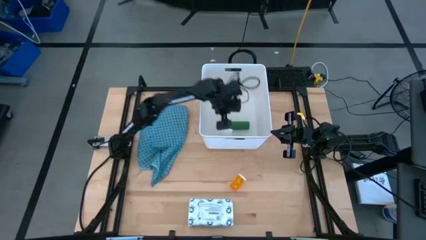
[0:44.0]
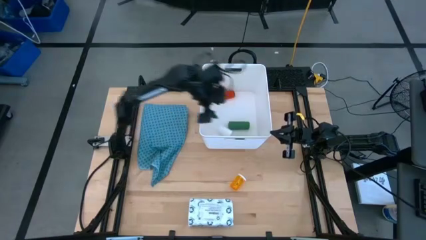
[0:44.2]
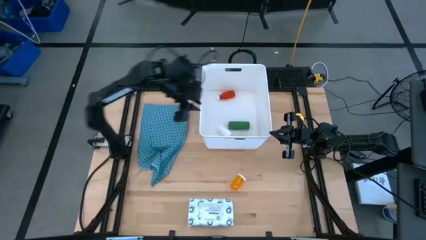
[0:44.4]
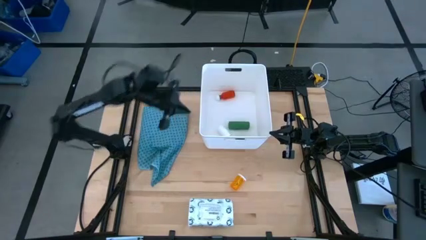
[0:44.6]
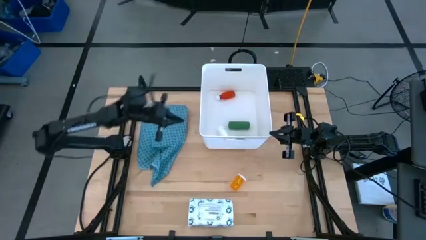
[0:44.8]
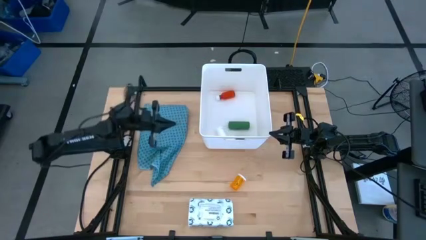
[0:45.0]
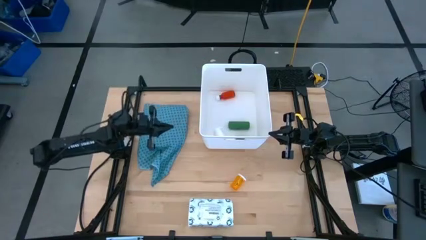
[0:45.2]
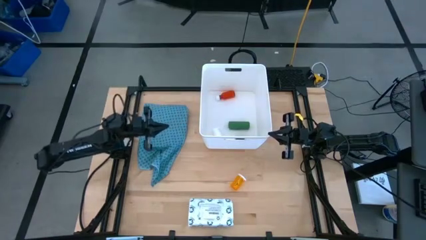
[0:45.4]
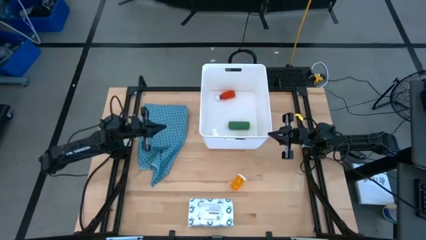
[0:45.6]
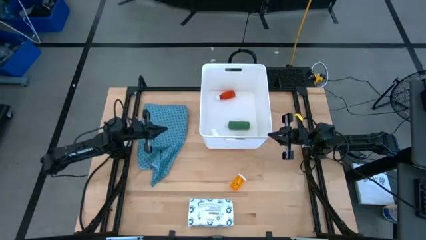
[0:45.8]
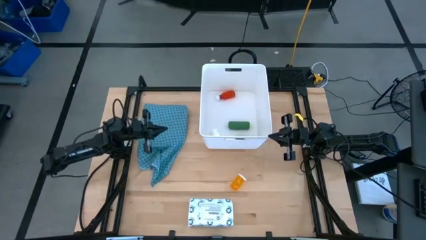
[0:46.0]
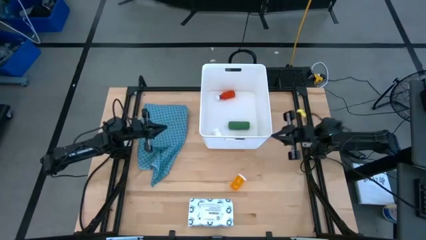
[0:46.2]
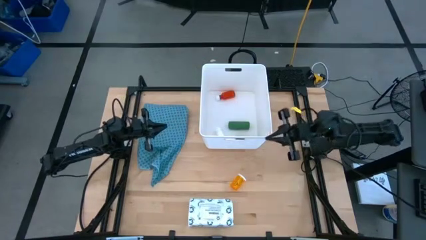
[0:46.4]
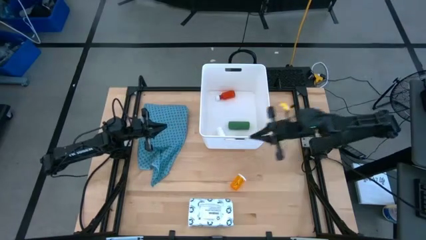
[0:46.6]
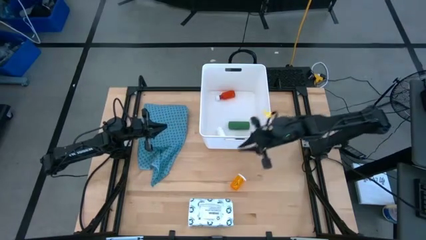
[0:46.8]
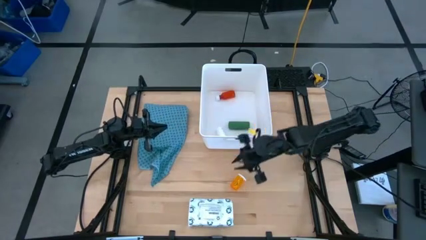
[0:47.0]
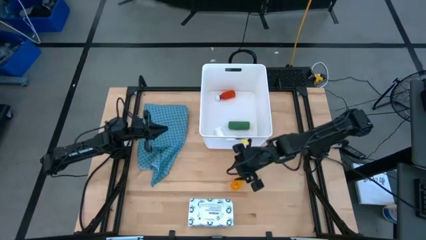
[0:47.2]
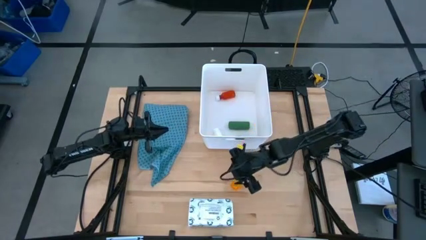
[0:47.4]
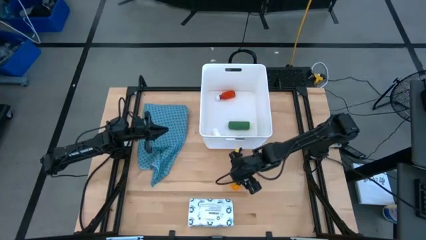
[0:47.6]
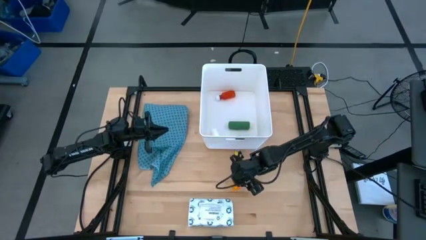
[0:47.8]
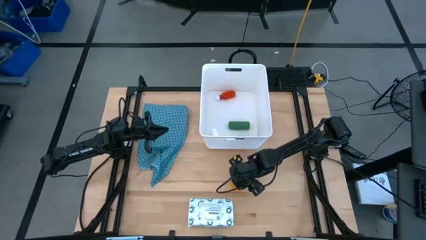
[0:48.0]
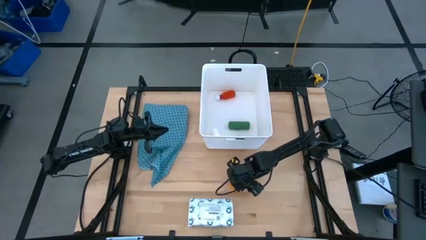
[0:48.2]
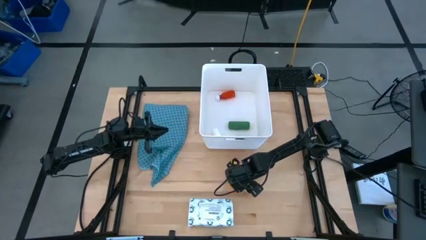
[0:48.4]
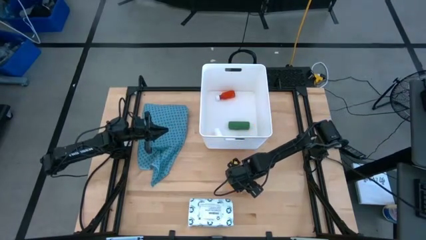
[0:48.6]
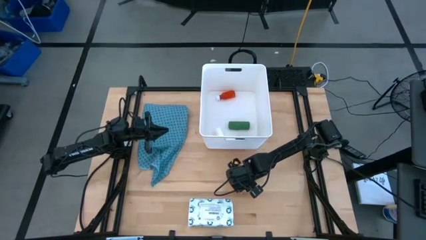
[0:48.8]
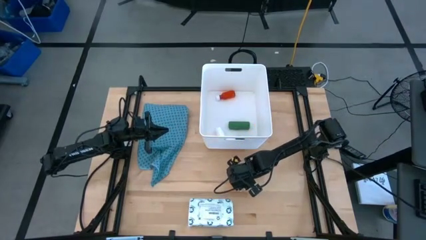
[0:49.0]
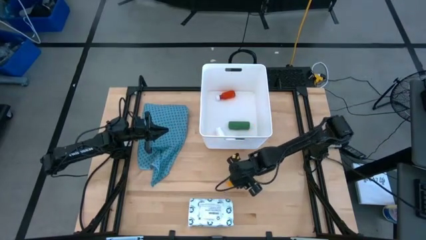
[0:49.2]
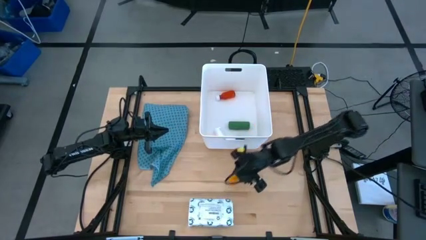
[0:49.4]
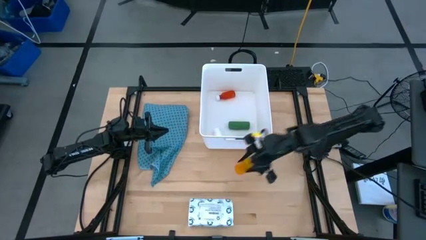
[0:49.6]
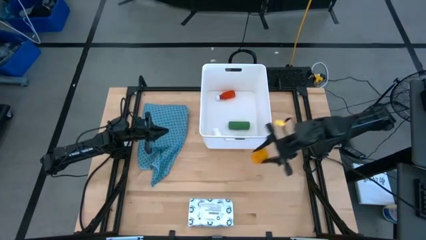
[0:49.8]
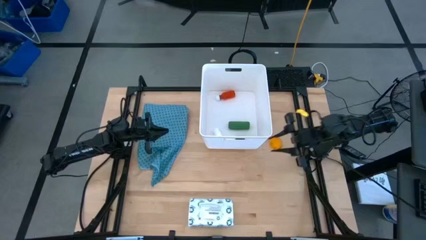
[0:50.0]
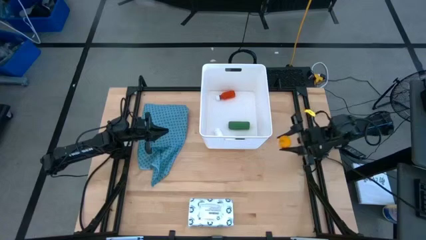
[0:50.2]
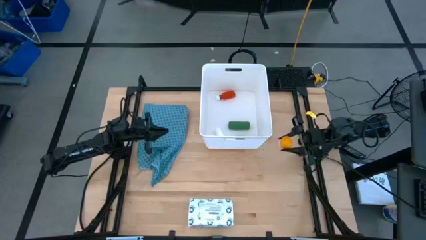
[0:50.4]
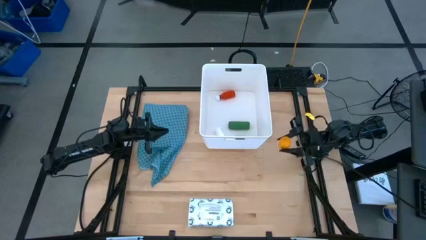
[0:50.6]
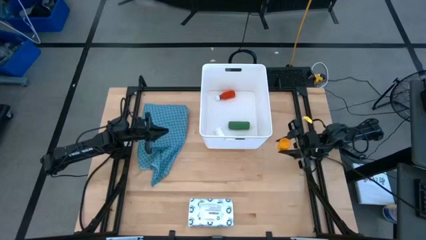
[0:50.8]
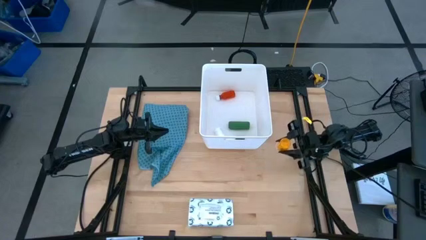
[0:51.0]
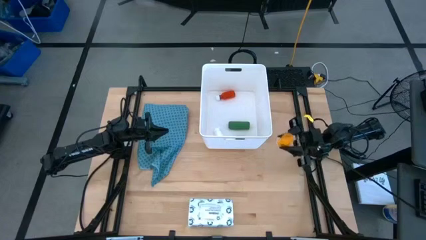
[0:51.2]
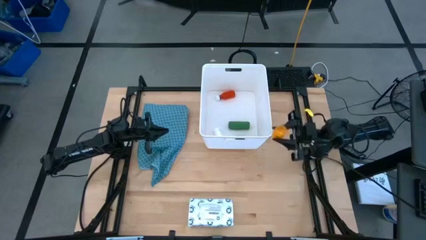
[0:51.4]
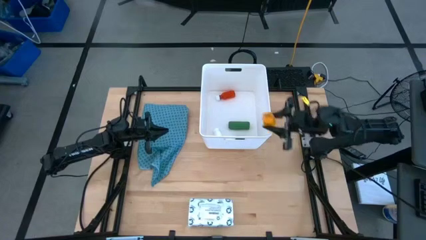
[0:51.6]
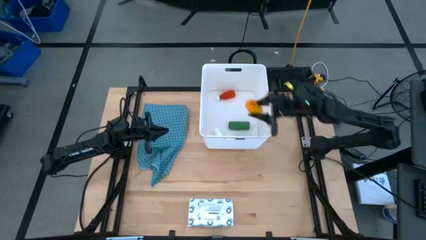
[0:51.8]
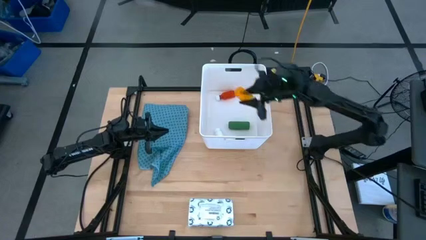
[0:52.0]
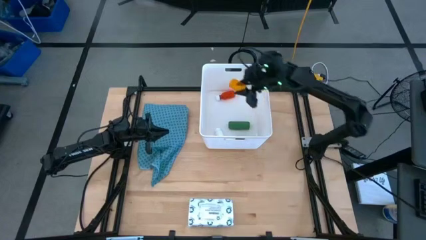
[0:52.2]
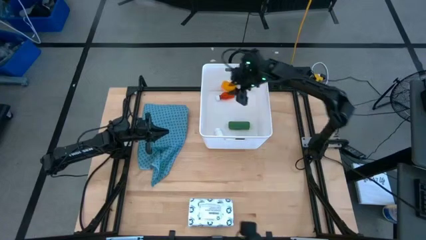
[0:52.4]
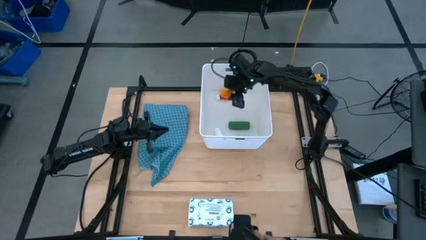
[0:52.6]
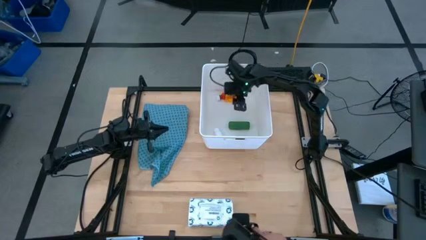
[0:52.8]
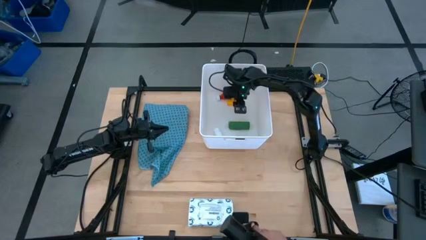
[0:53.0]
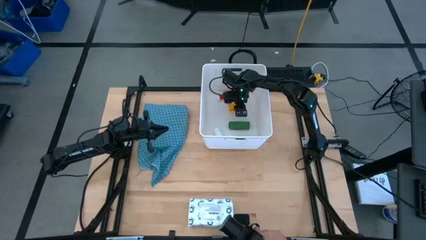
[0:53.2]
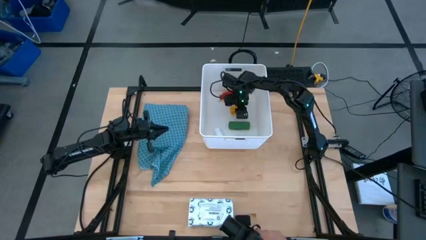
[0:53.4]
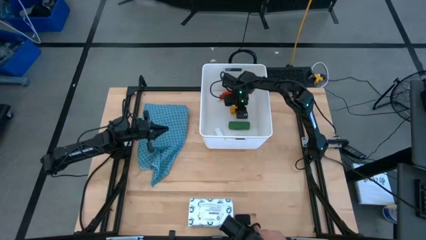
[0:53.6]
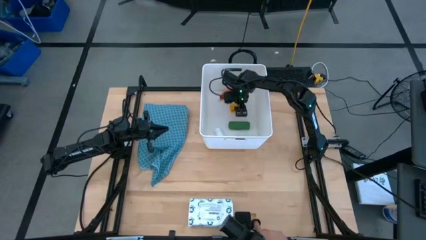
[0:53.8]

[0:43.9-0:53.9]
Task: Pick & place medical supplies in basket/bin
Put the orange pill bottle into the white bin

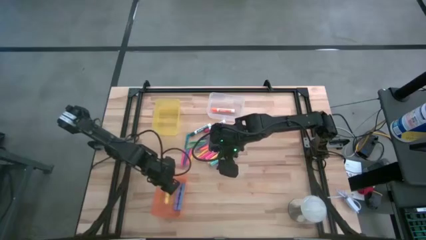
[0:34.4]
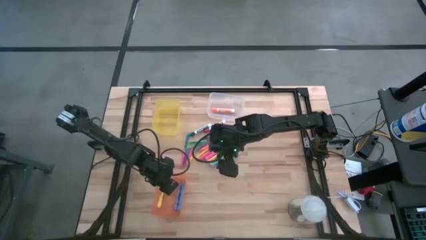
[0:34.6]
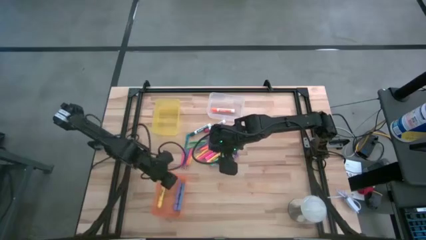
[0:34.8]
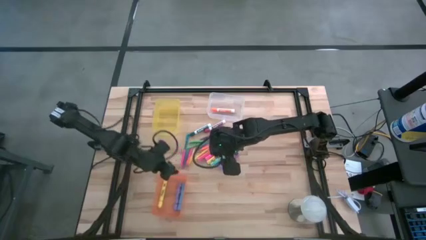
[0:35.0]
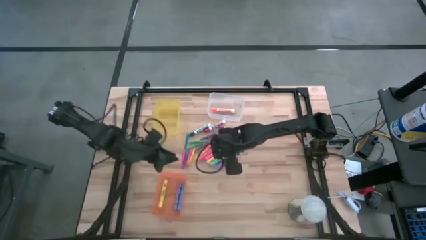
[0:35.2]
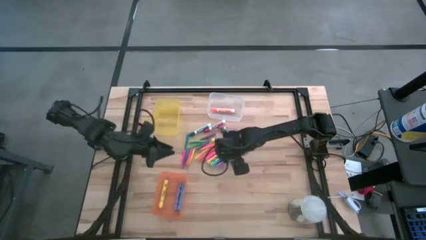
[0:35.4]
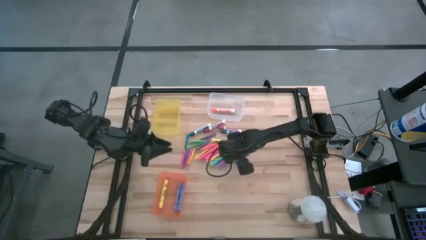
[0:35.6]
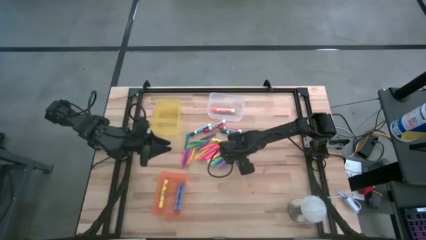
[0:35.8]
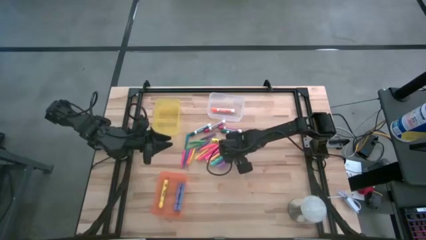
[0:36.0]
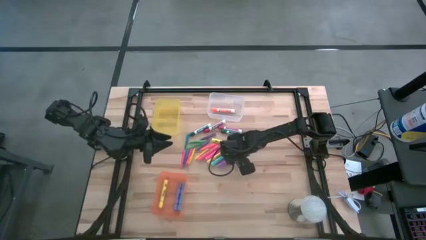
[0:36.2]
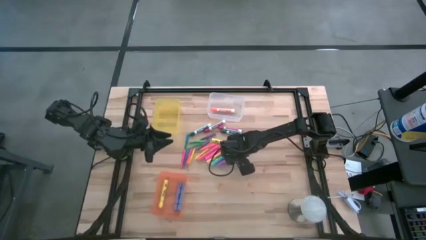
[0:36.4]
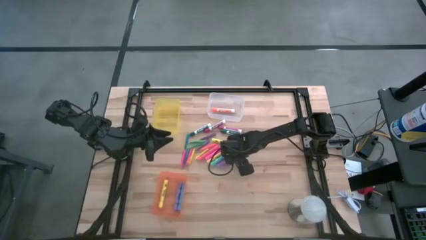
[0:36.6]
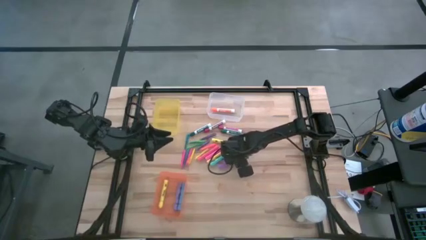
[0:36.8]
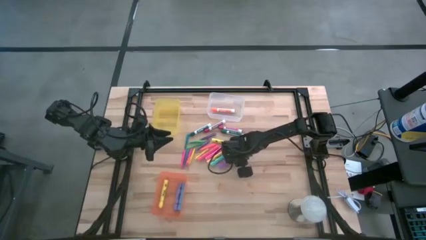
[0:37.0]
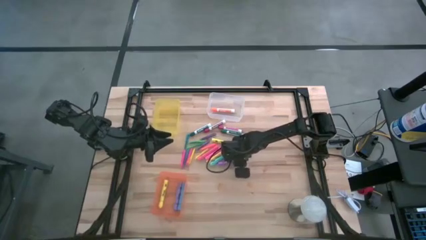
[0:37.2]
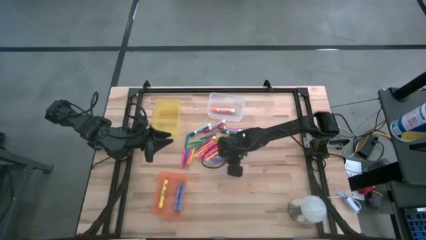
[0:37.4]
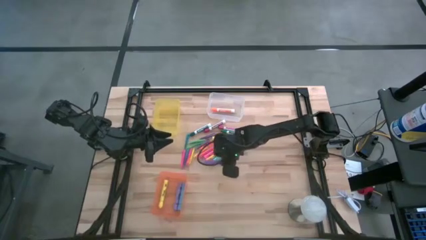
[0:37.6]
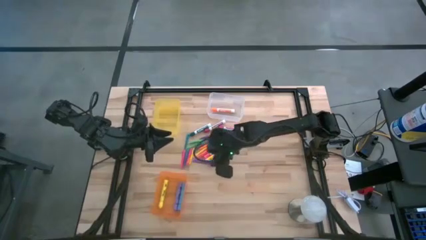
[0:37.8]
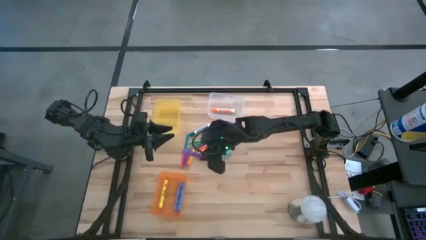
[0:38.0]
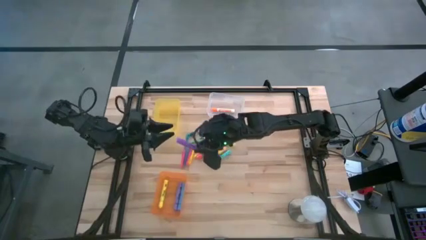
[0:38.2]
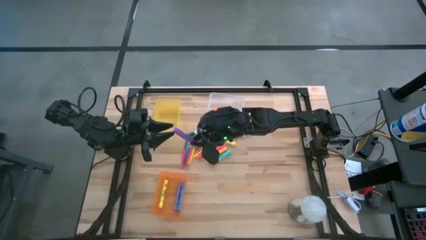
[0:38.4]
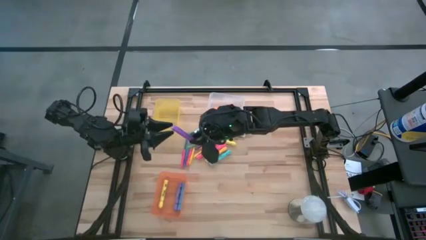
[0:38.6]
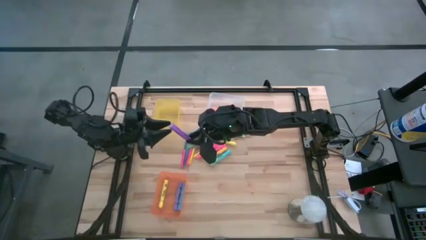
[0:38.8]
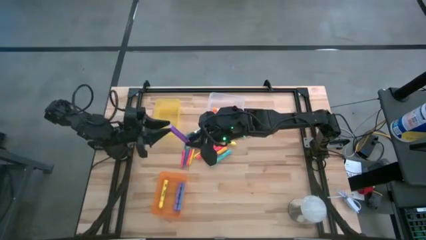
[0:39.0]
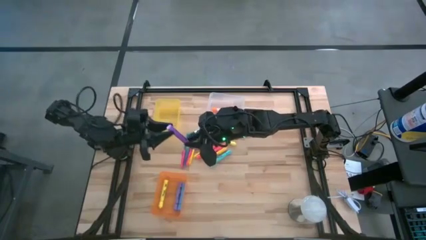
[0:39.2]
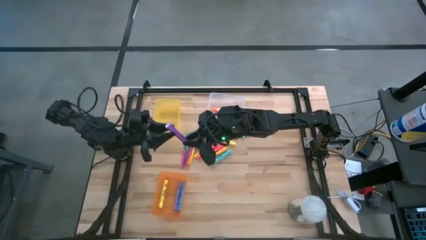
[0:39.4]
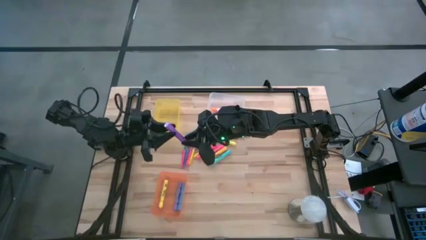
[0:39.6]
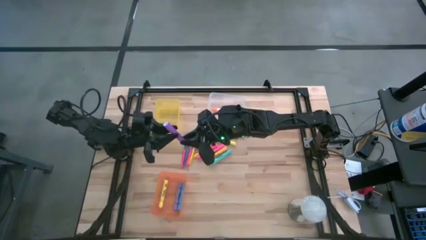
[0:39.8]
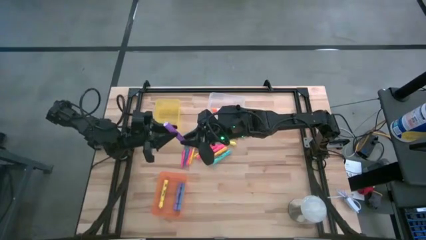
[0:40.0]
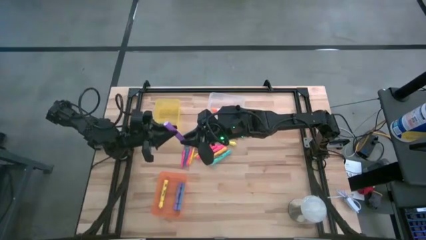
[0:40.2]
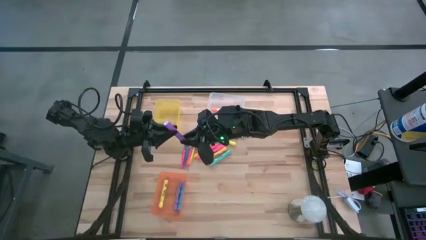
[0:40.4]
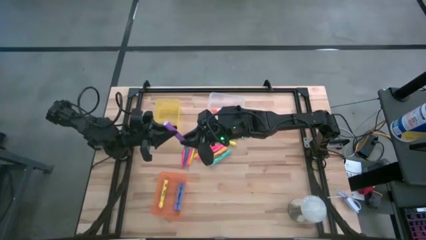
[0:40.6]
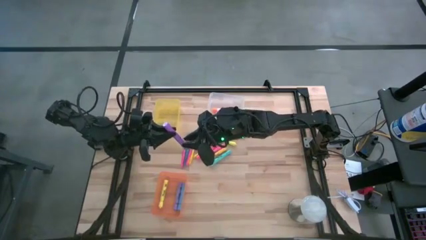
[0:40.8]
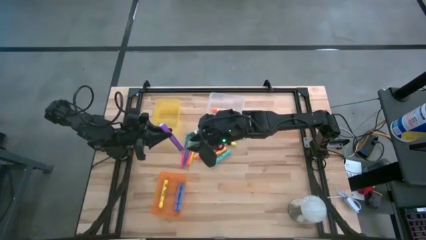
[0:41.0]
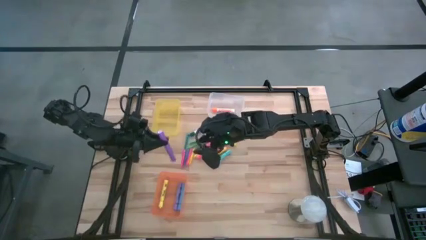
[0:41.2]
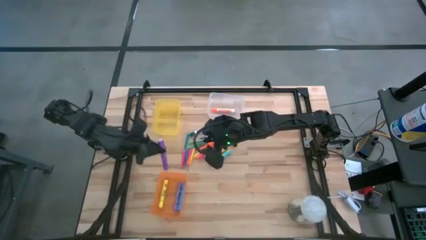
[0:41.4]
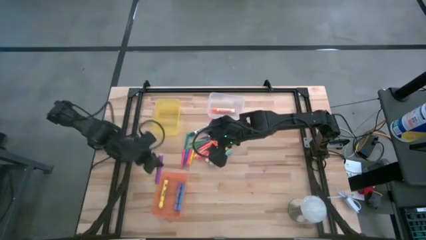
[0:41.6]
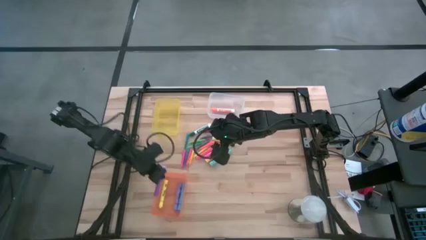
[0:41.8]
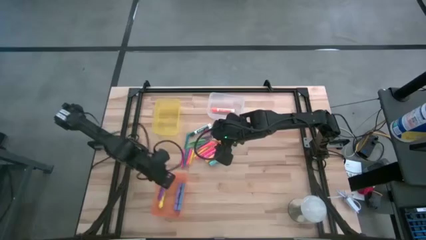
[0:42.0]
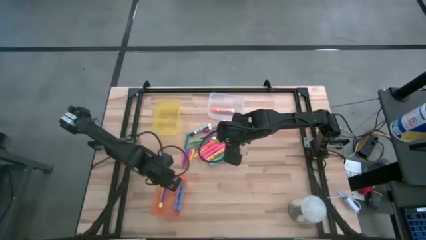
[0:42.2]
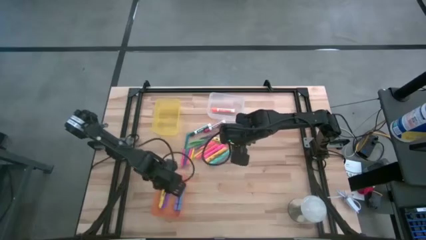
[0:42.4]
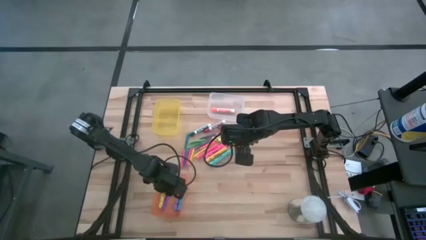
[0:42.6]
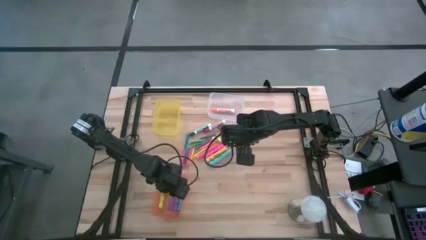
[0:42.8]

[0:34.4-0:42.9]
Task: Pick & Place Markers
Put the light purple highlighter into the orange bin
